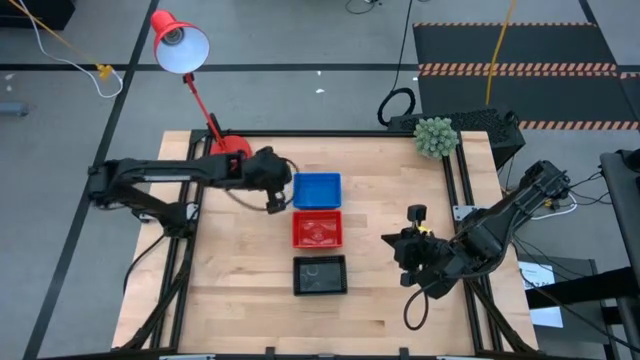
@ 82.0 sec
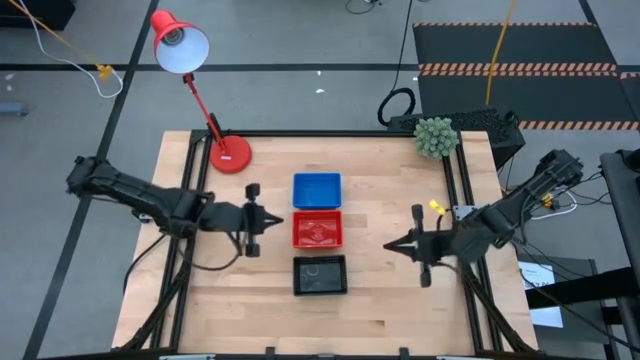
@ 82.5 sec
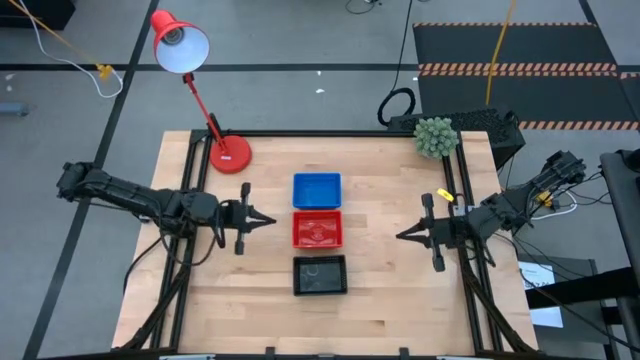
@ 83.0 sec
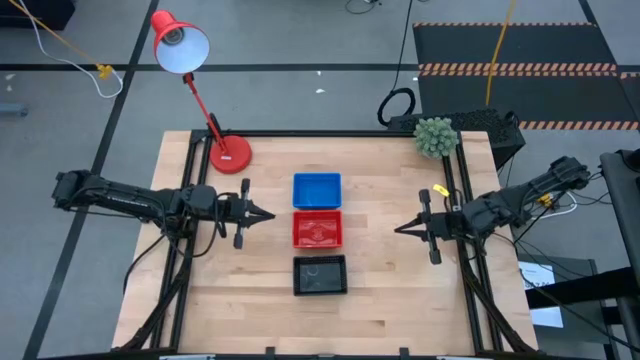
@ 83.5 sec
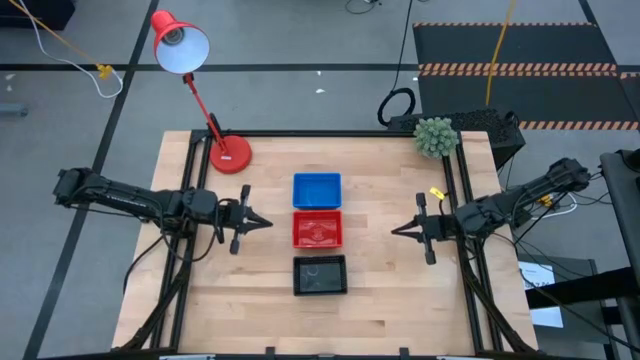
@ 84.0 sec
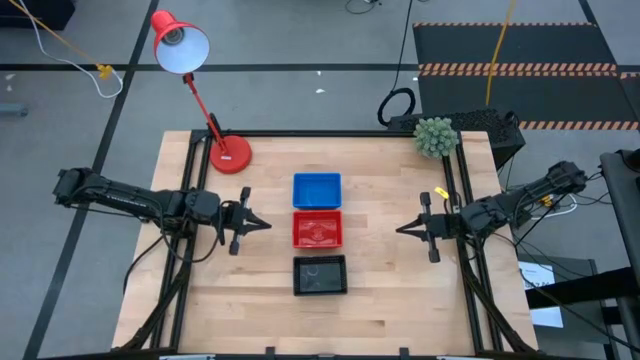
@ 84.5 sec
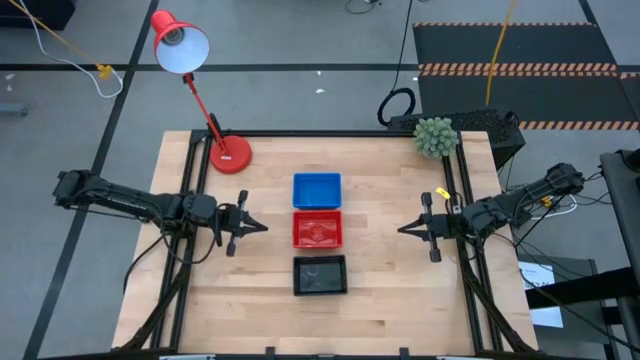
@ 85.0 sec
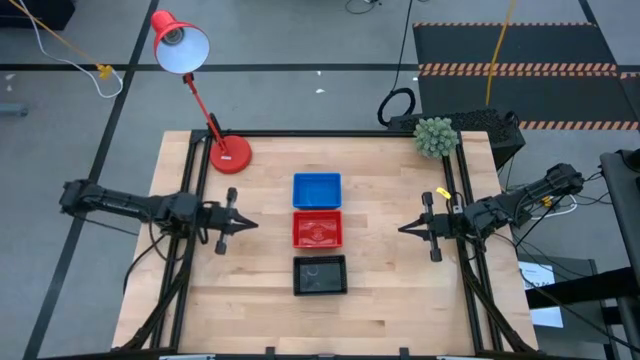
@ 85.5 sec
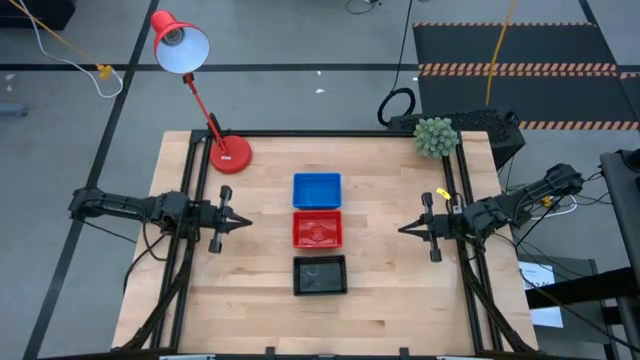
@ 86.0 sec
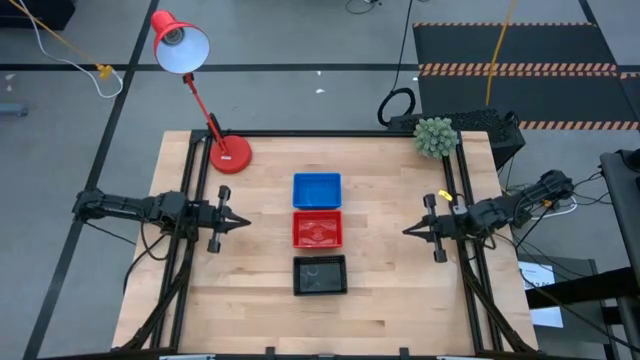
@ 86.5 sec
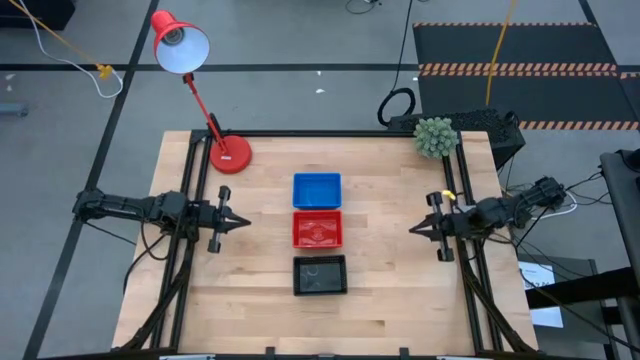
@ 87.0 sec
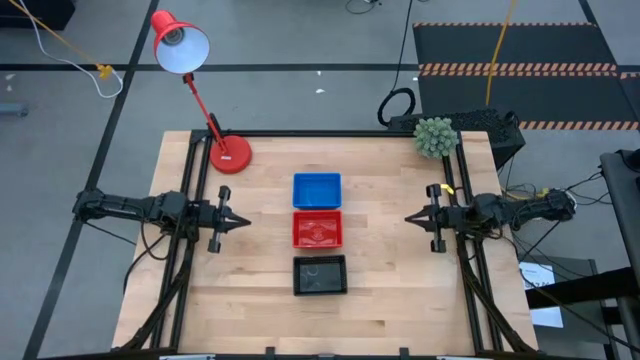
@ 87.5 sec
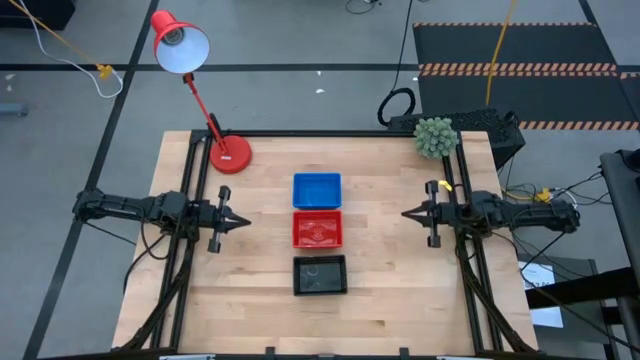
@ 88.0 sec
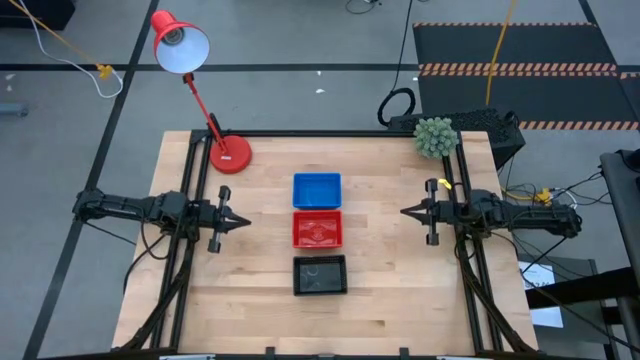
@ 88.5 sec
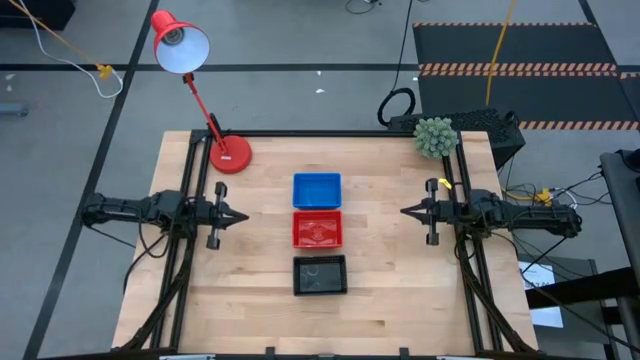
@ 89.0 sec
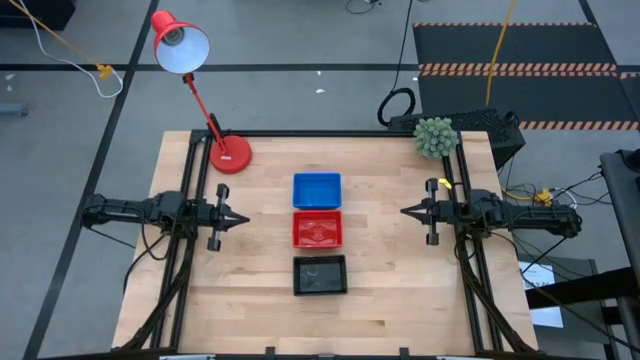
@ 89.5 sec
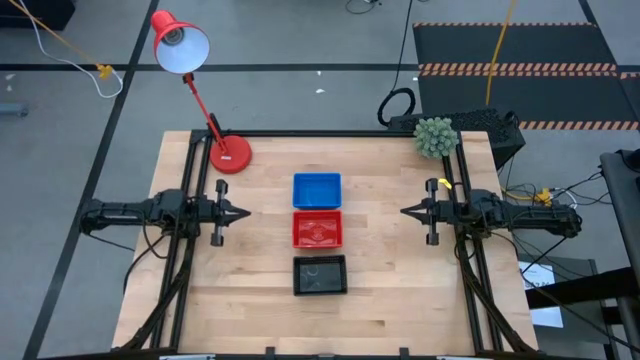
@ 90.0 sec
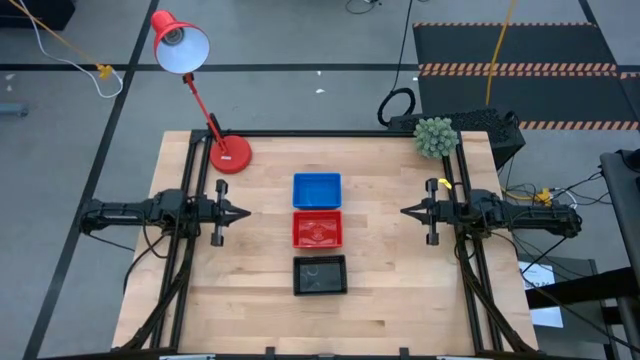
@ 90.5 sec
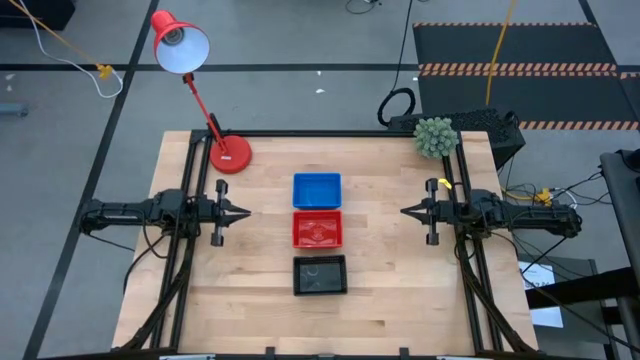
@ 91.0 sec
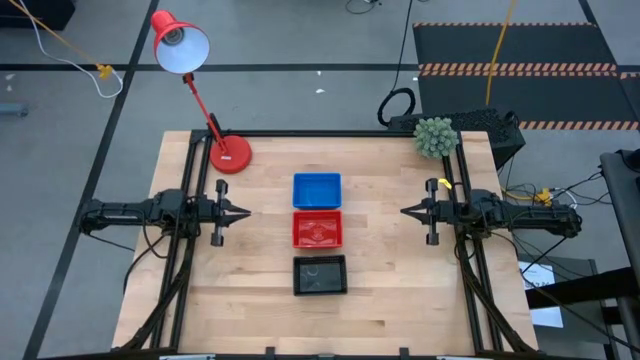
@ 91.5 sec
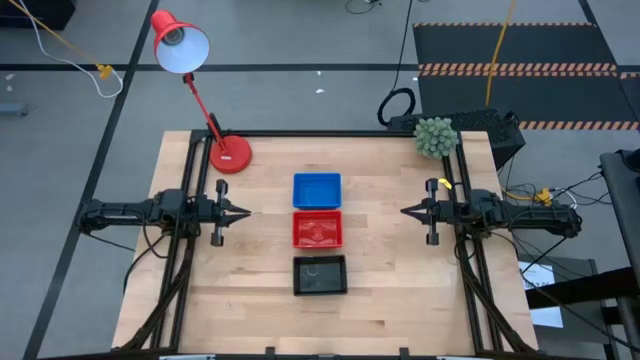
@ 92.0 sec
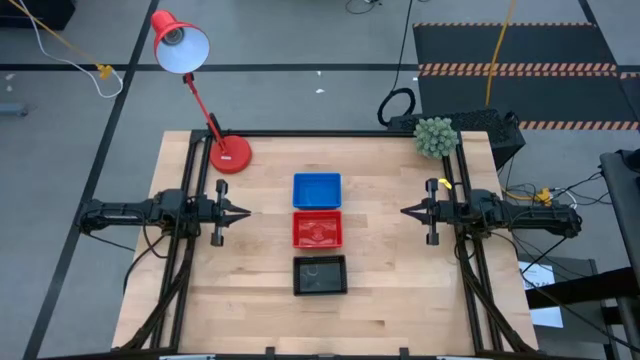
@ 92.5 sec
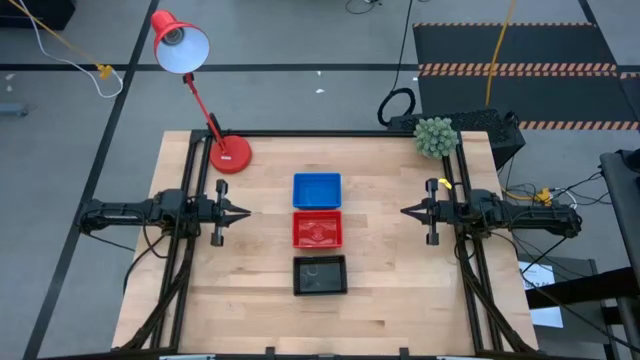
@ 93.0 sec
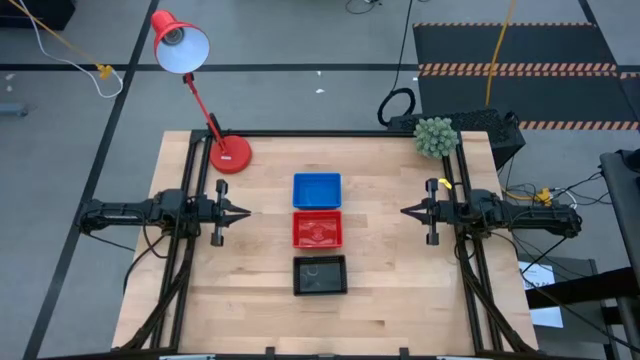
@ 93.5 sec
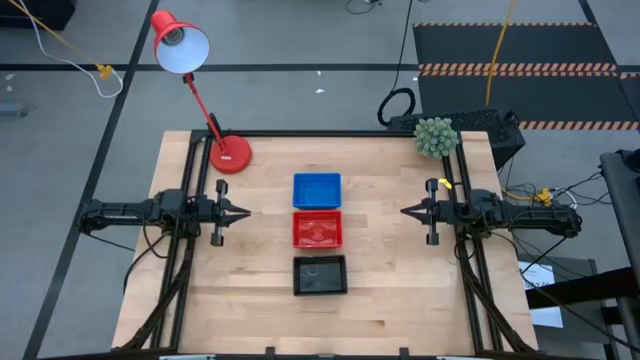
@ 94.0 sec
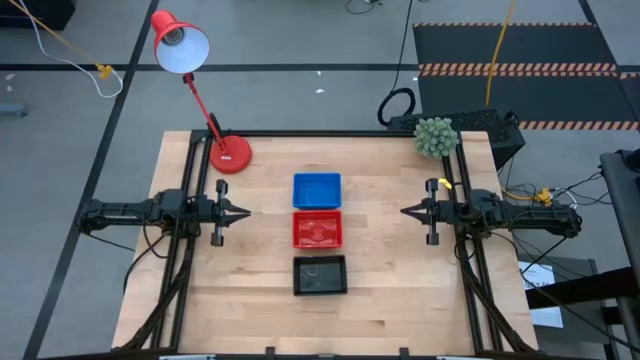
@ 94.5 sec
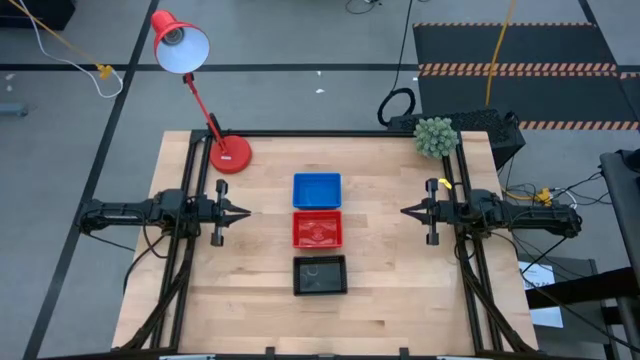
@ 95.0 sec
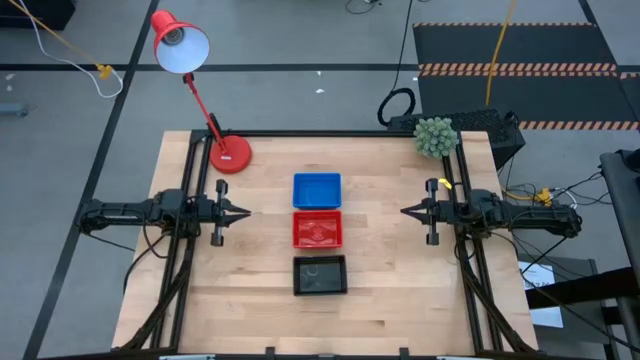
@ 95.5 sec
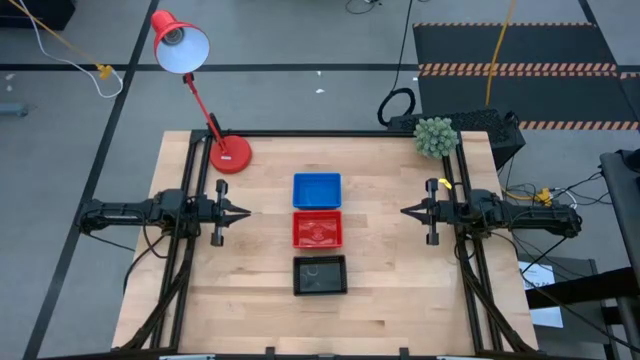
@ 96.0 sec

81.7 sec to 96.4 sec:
Return to Home Position

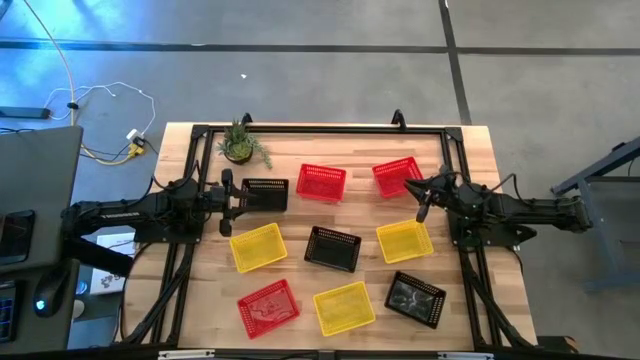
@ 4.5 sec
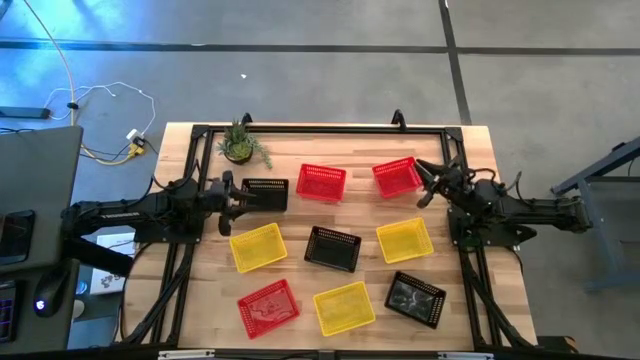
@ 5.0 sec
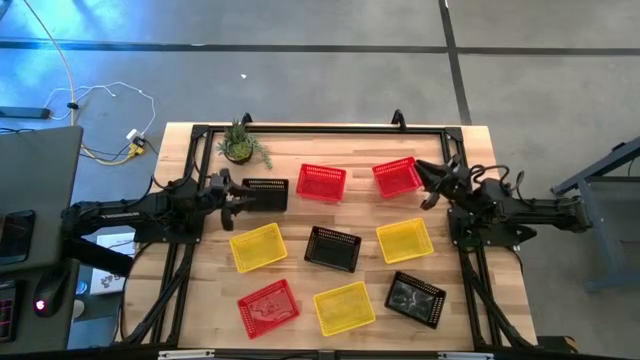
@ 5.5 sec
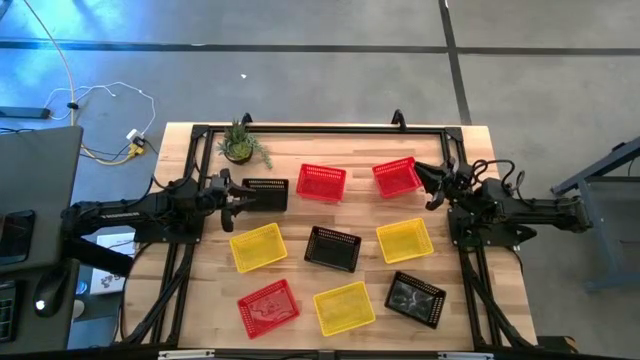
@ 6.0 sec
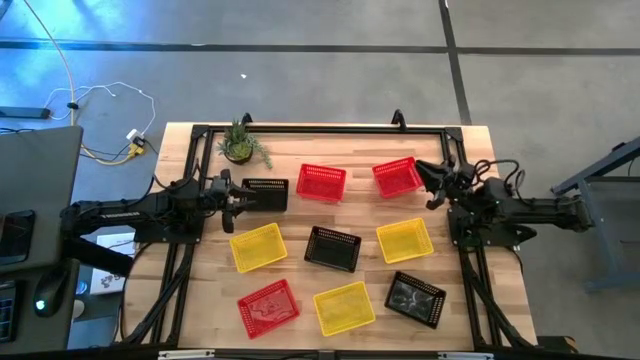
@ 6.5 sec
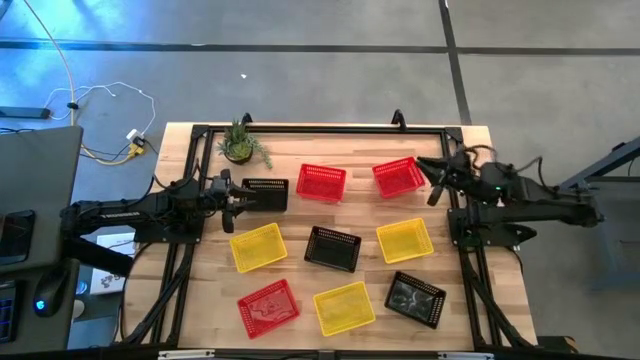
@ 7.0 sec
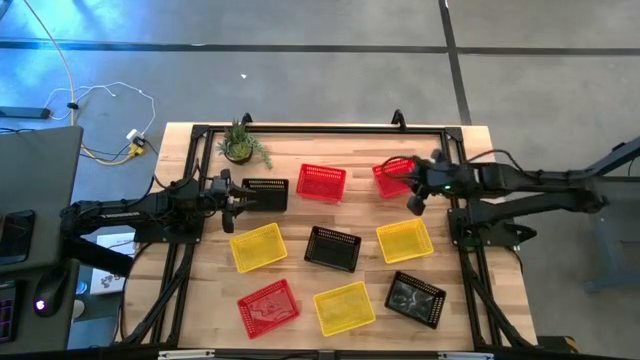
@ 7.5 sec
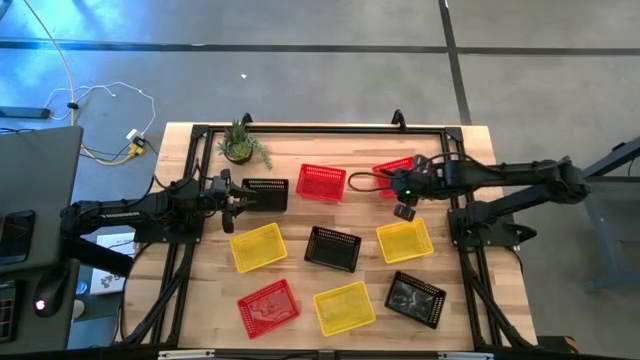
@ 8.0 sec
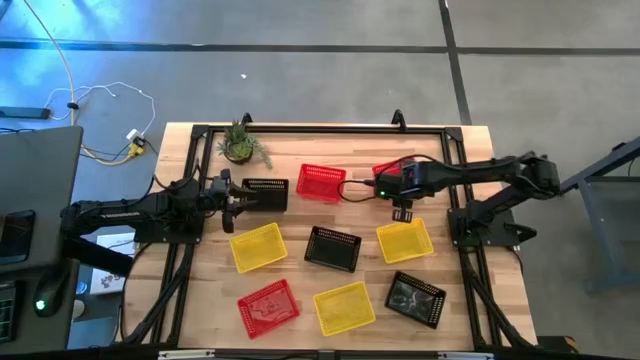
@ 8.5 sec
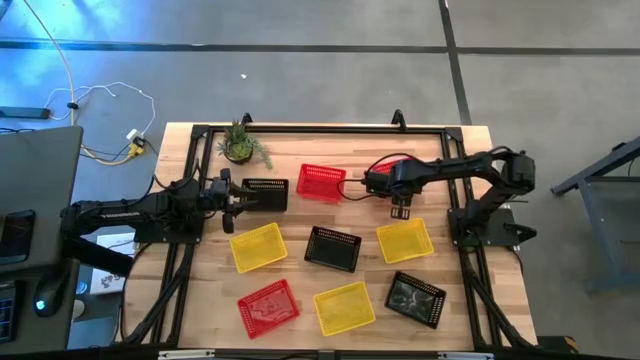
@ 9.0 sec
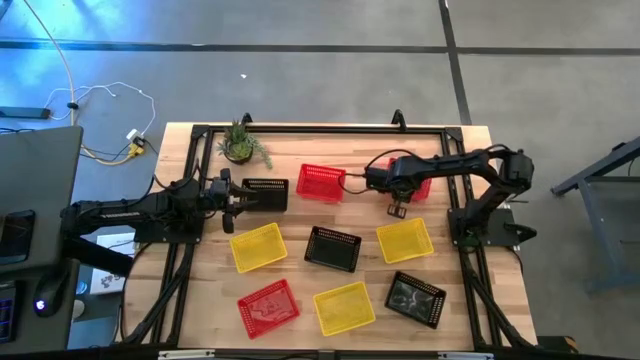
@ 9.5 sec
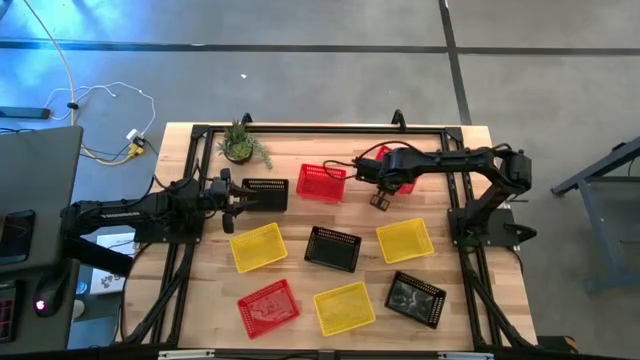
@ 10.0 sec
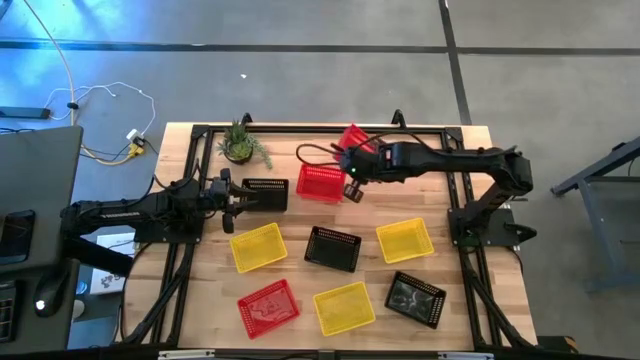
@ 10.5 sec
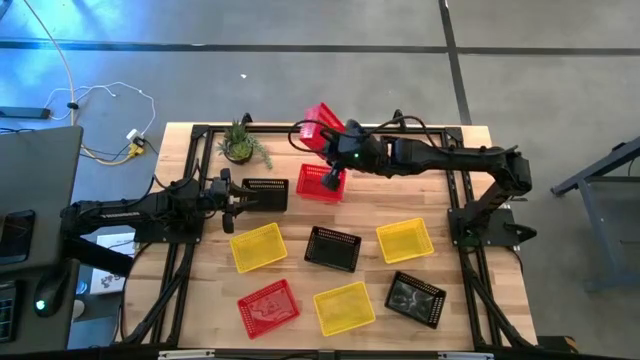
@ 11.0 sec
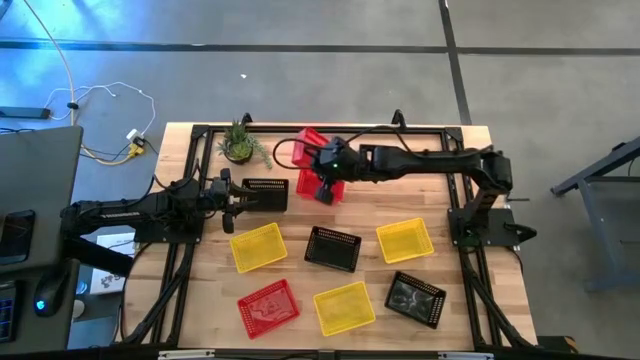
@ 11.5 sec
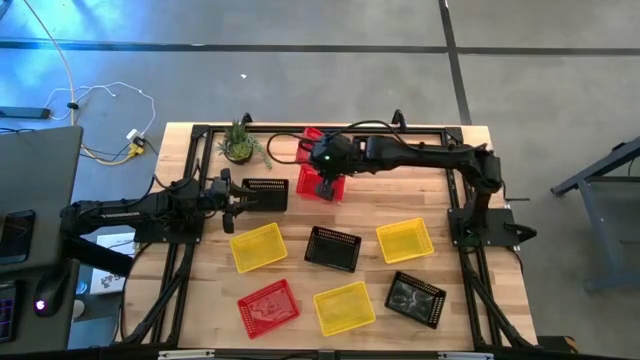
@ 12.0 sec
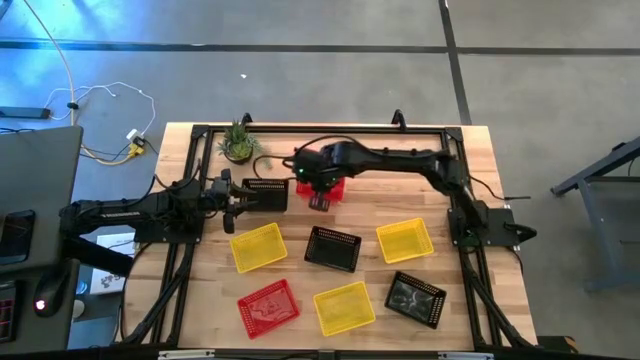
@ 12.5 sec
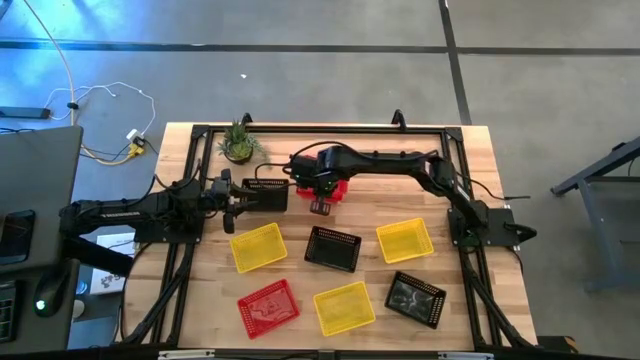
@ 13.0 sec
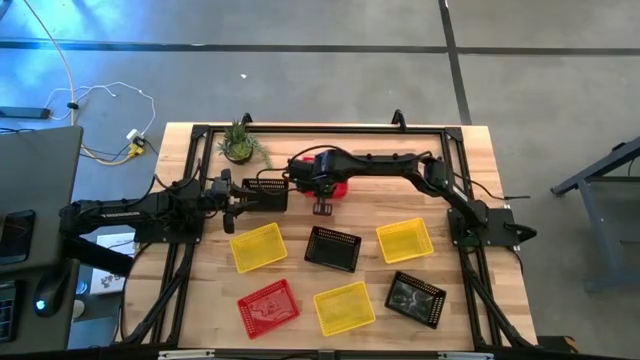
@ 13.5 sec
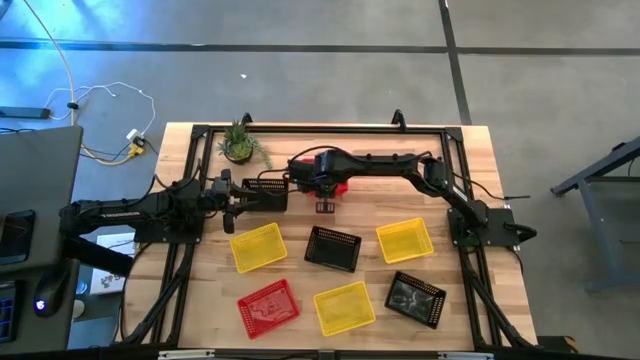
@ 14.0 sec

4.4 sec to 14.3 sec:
Stack the top right red bin on top of the top left red basket
